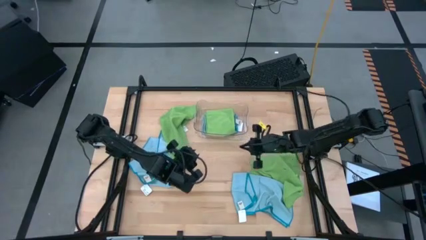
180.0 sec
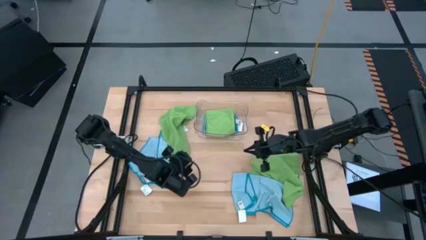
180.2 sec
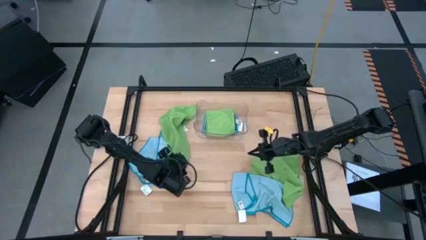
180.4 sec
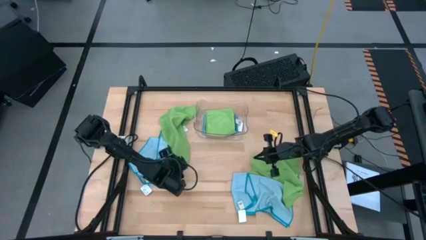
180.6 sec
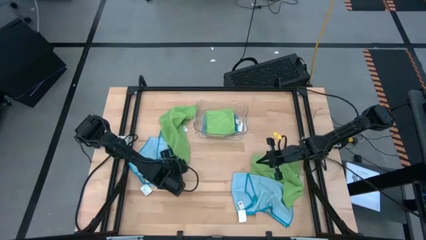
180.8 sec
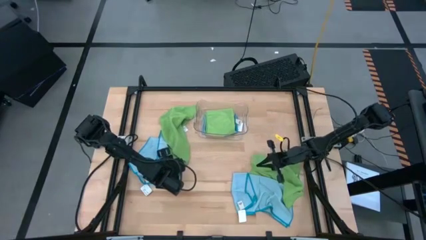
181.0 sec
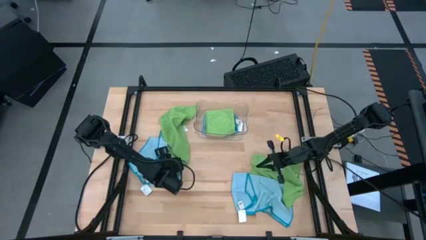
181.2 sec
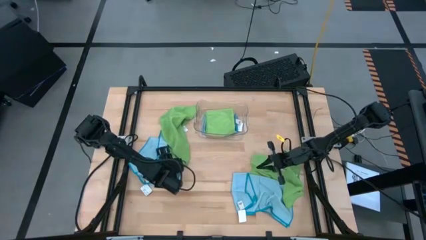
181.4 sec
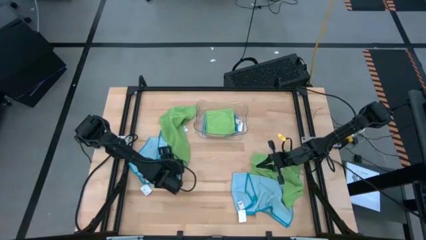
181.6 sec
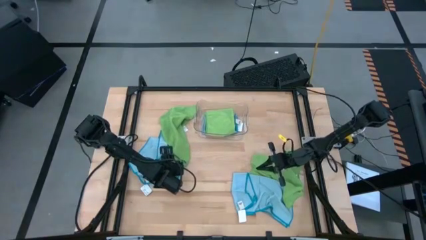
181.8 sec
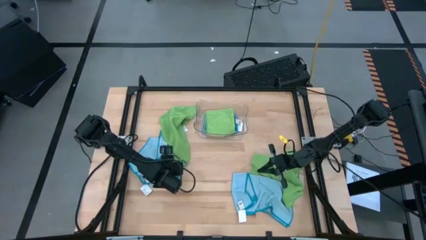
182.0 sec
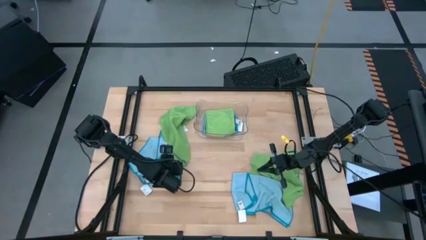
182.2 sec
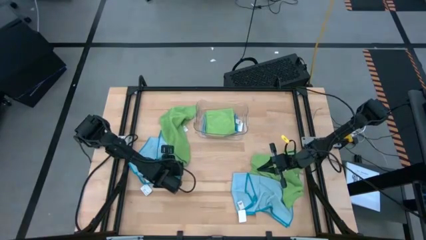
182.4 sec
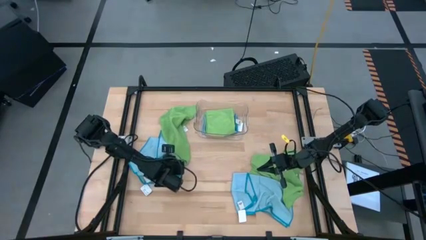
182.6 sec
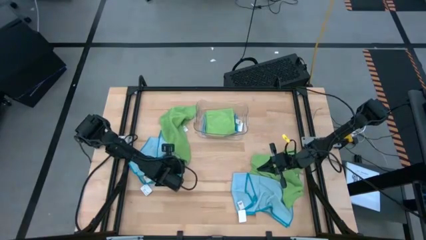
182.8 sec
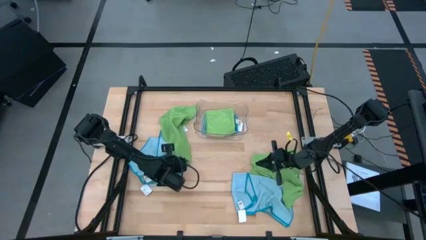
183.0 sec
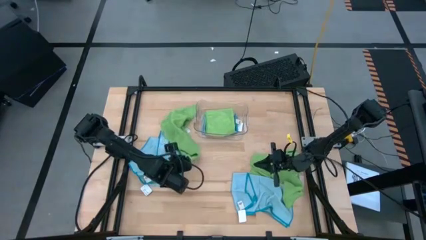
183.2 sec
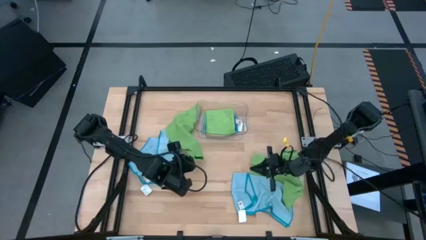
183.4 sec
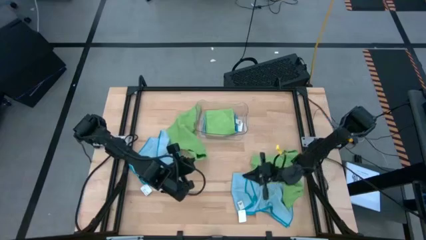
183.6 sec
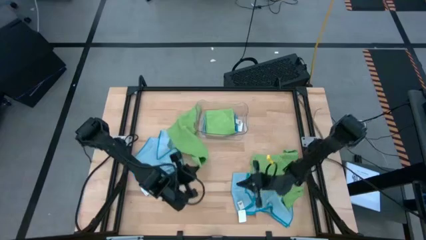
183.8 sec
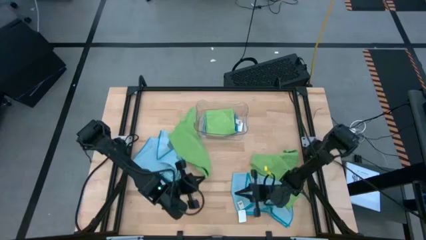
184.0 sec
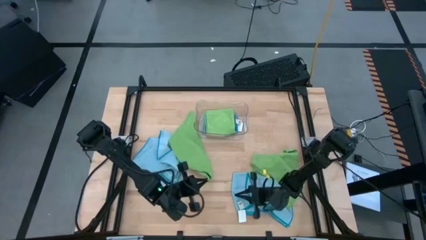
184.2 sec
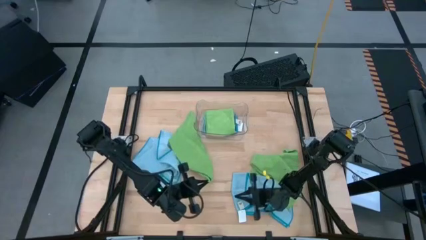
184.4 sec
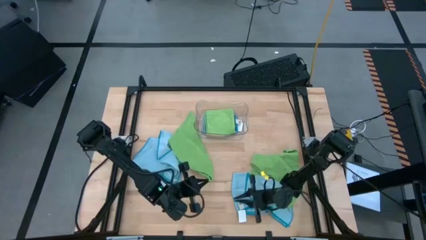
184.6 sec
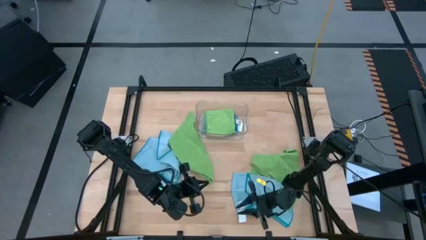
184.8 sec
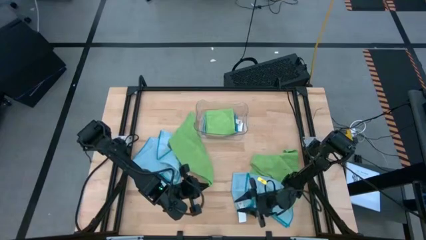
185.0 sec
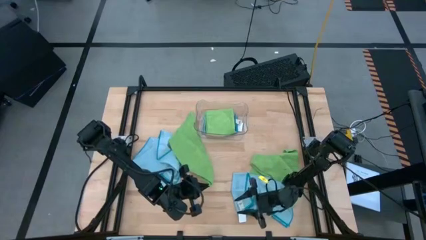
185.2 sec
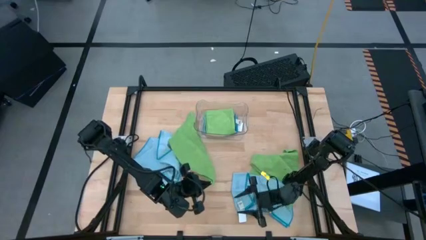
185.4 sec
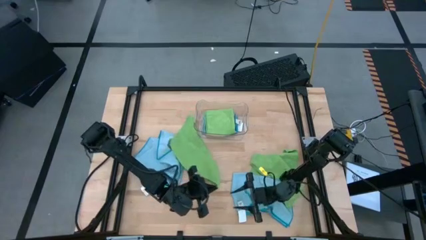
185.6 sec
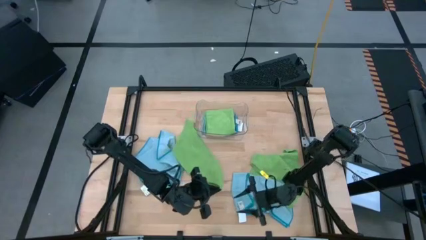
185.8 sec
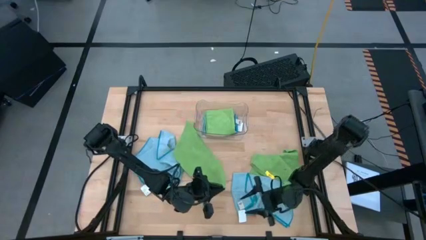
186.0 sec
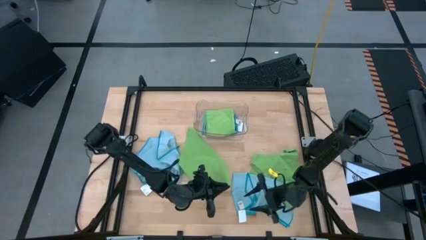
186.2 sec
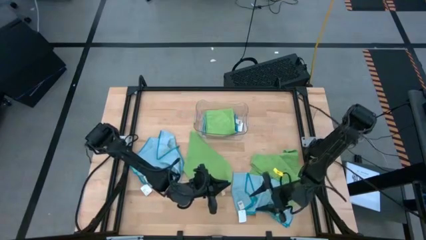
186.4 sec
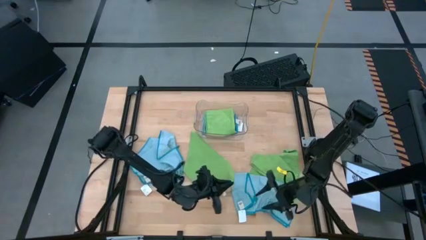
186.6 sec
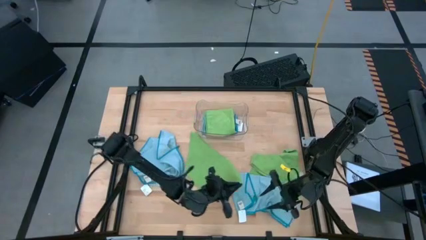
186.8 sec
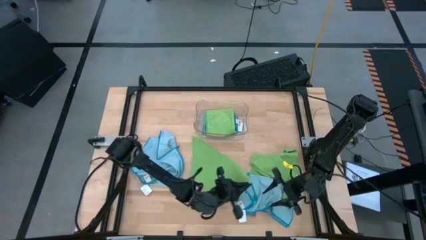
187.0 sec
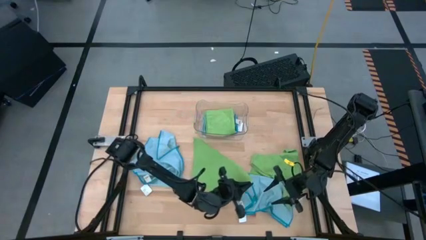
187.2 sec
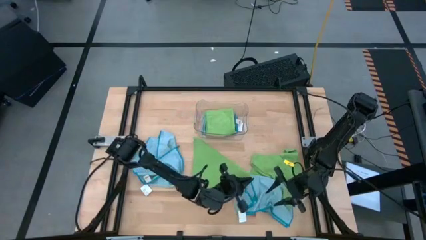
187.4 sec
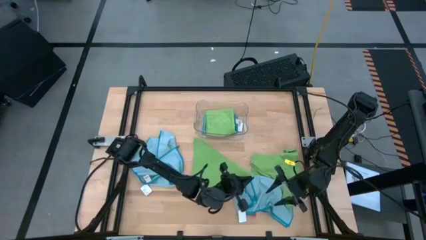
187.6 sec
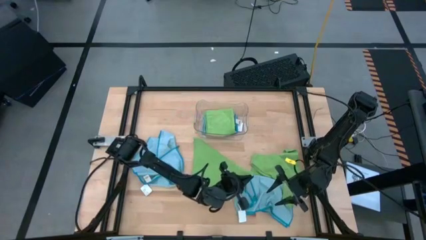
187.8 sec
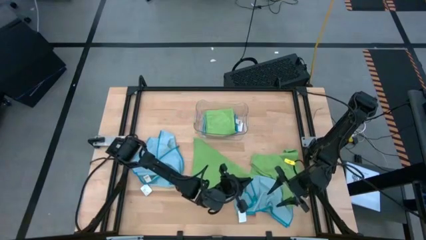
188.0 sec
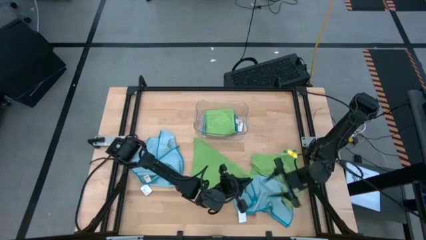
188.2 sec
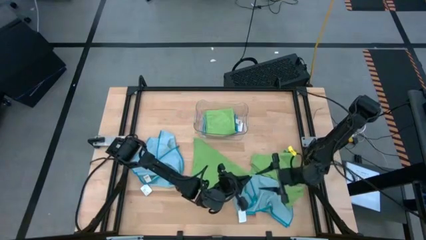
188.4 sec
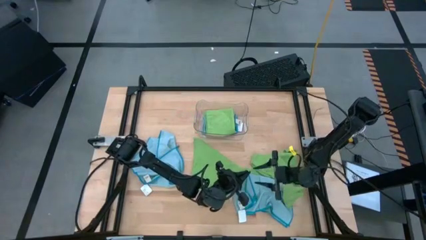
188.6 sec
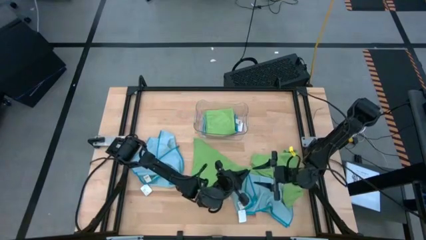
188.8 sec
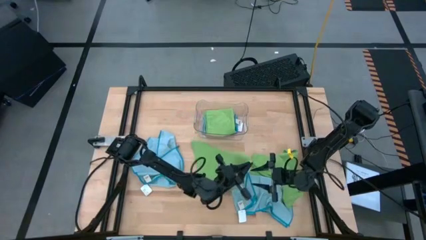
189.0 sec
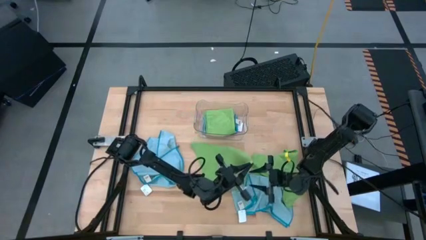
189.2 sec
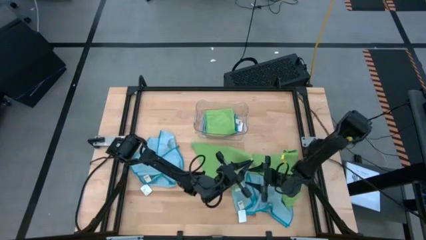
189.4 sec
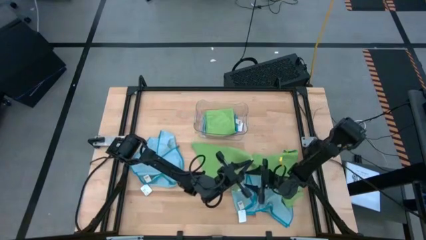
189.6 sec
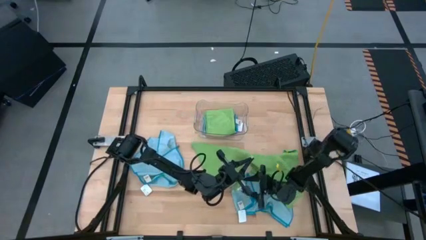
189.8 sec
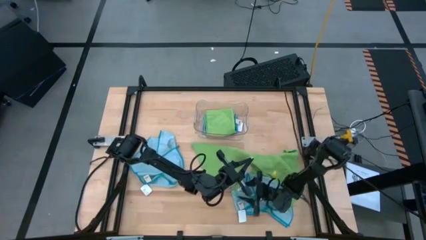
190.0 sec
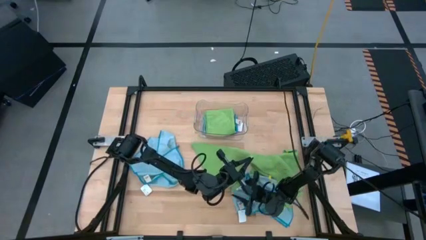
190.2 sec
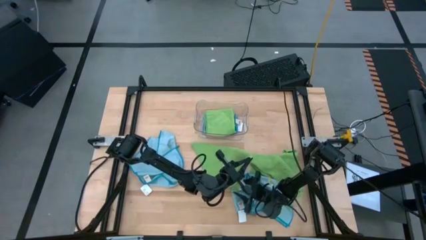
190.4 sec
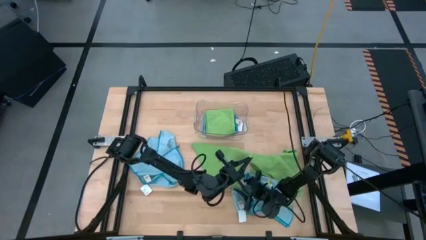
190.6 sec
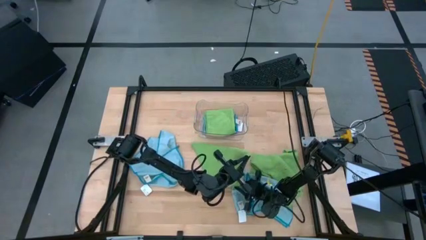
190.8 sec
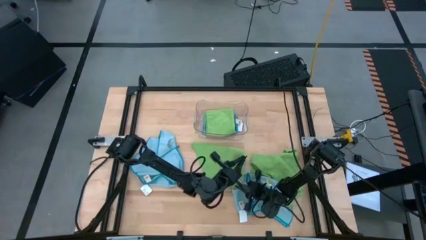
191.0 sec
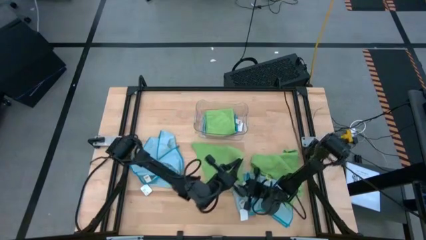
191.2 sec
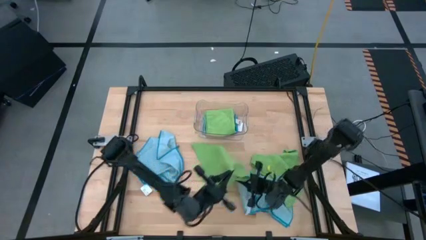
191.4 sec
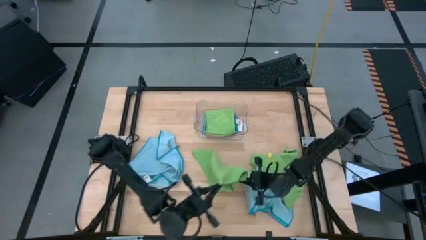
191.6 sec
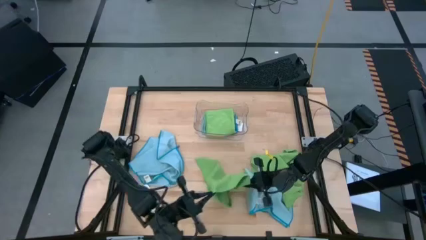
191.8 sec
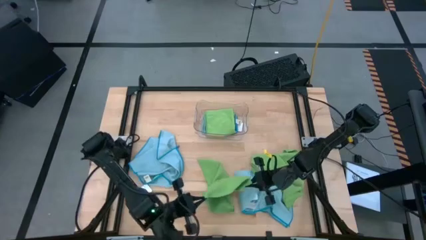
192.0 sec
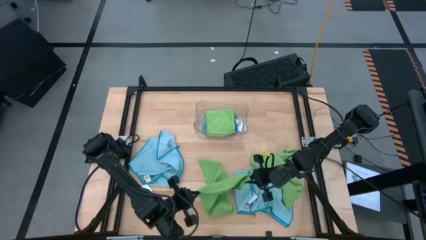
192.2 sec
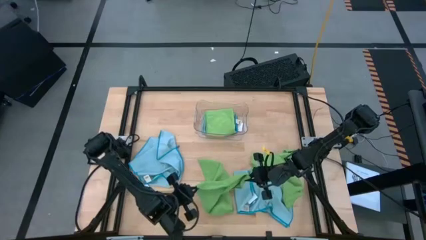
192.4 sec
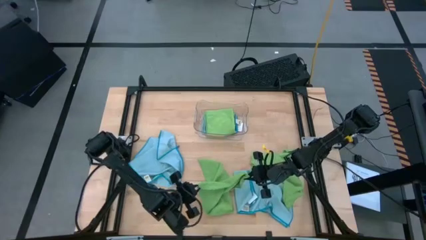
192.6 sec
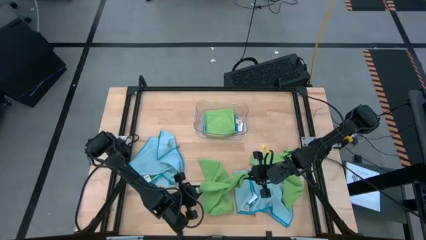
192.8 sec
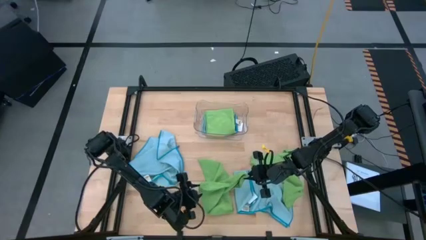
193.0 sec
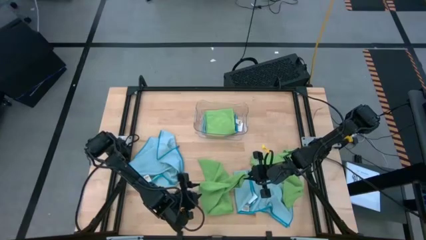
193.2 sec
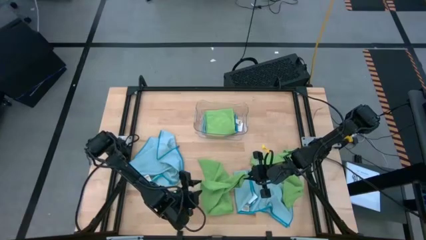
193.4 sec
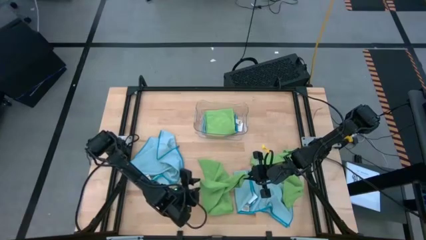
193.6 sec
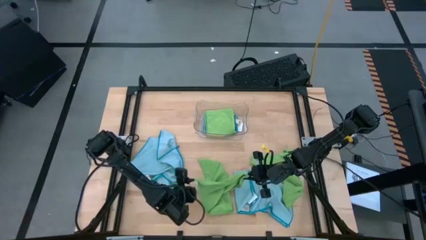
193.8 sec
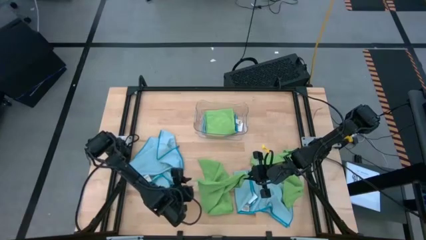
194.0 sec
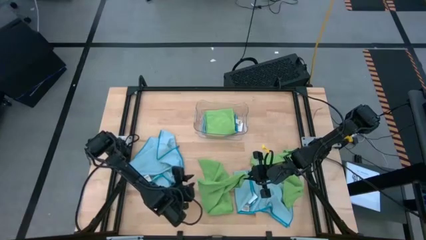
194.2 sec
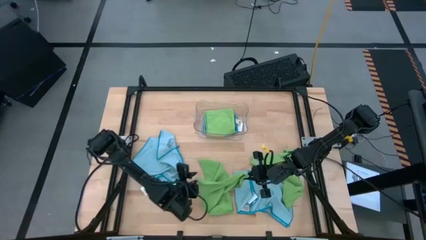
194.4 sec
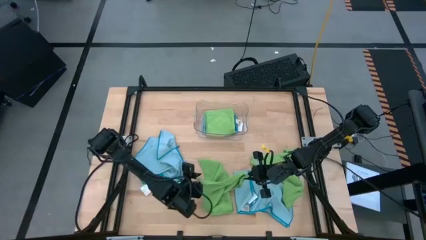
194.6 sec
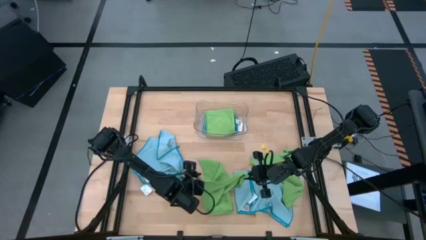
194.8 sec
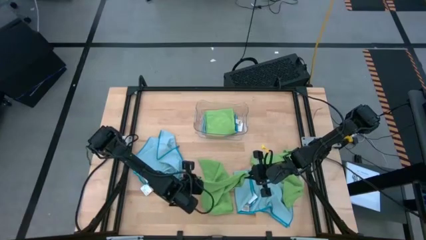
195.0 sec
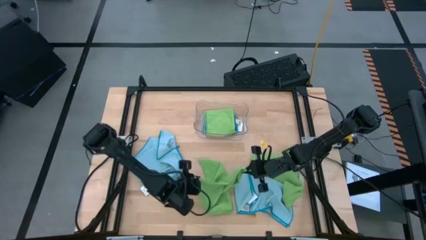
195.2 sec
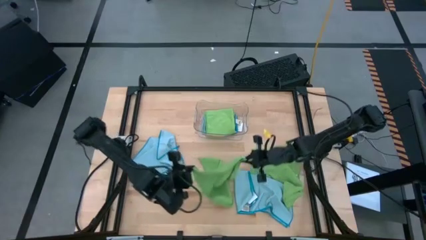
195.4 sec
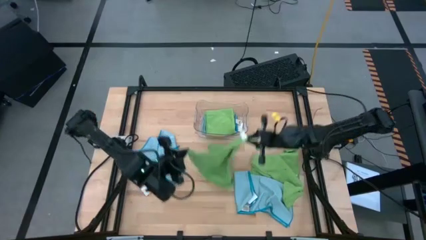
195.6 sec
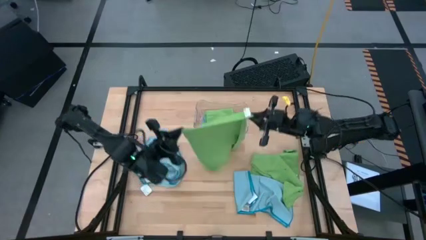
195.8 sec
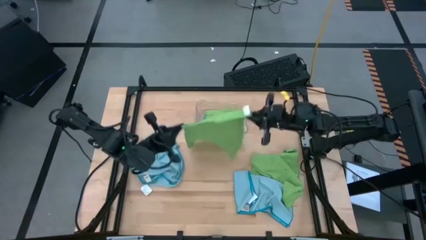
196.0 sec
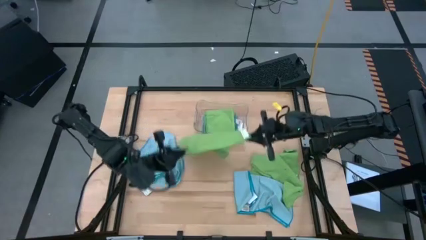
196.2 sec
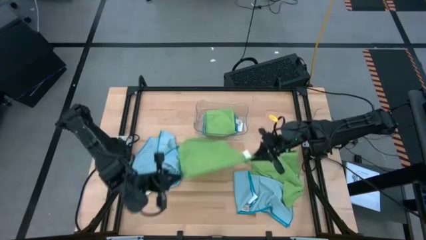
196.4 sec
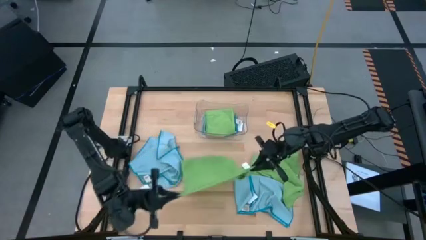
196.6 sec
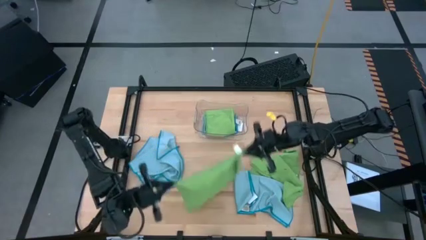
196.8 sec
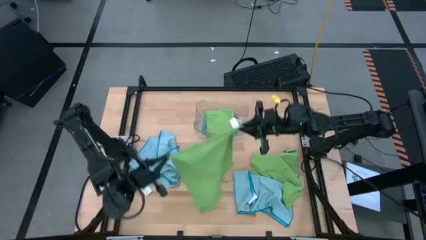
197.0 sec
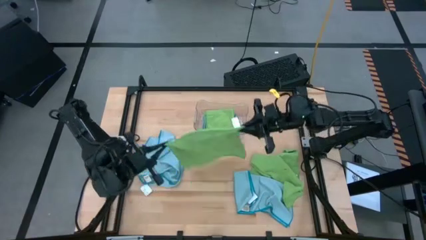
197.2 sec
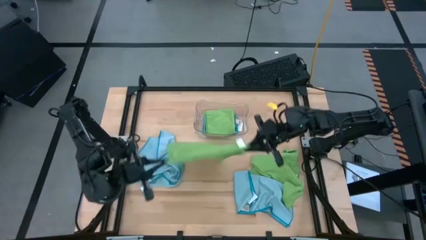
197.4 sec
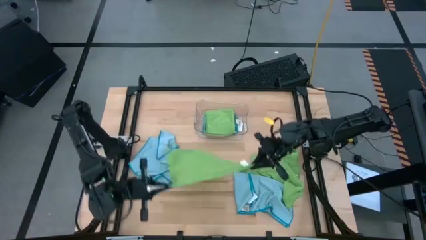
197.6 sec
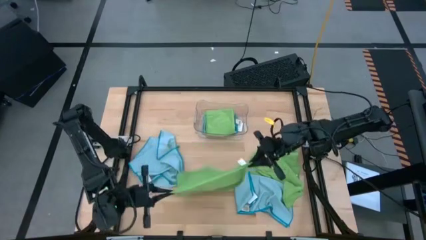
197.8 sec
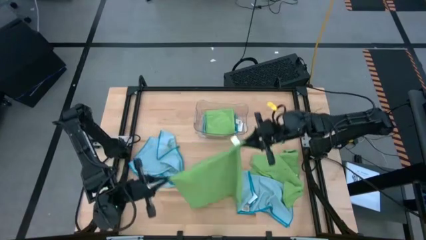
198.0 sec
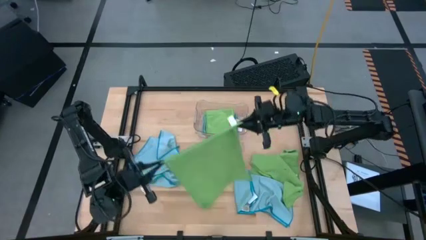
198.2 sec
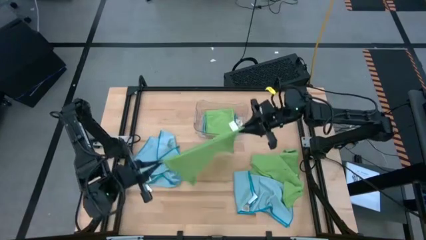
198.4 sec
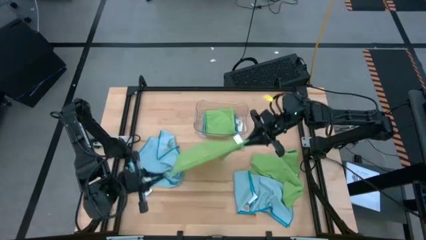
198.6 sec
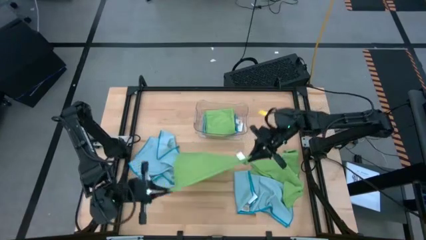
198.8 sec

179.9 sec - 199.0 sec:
Task: Fold microfiber towels
Fold the left green microfiber cloth
